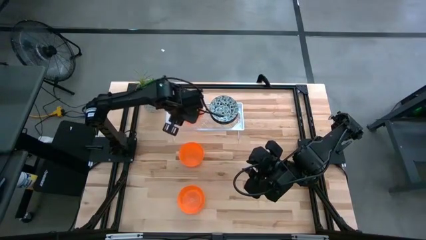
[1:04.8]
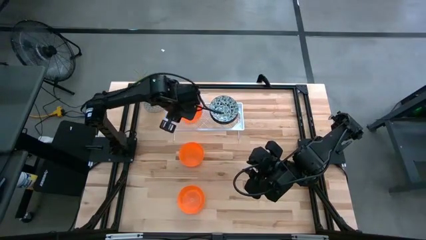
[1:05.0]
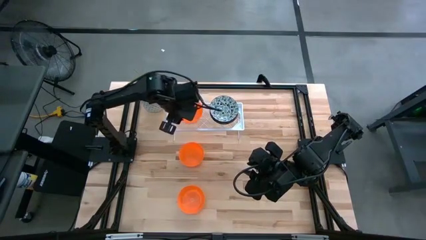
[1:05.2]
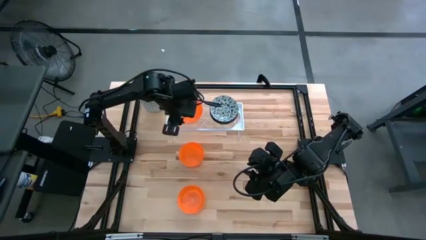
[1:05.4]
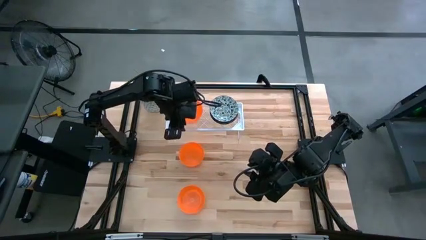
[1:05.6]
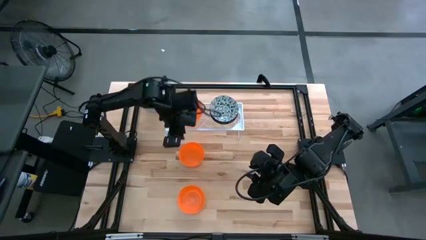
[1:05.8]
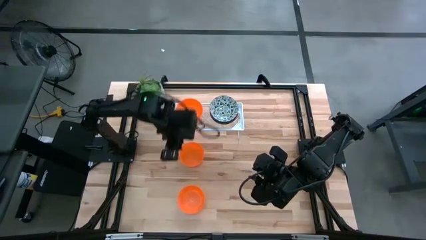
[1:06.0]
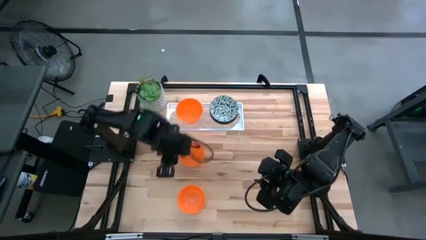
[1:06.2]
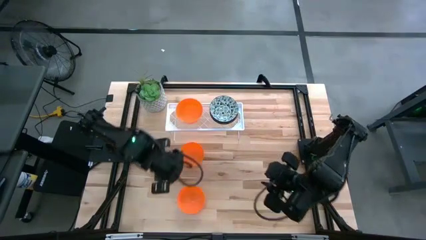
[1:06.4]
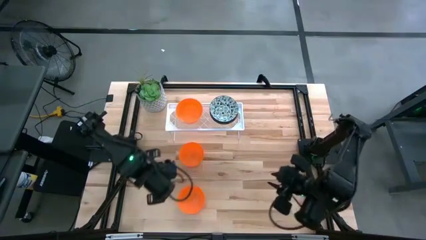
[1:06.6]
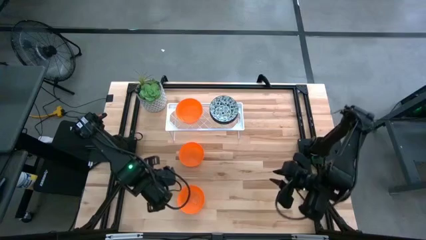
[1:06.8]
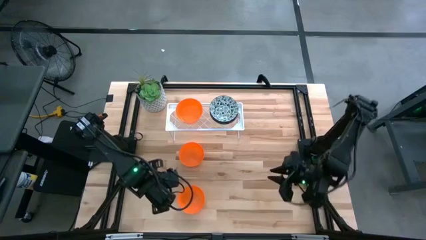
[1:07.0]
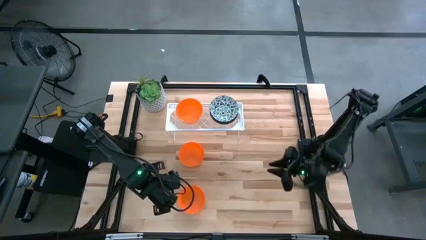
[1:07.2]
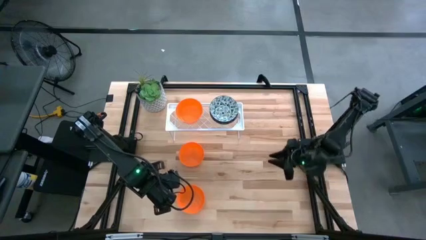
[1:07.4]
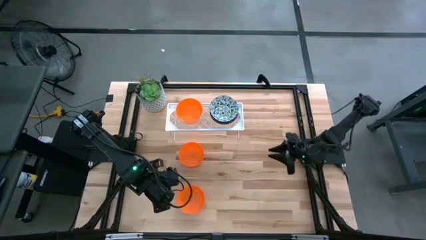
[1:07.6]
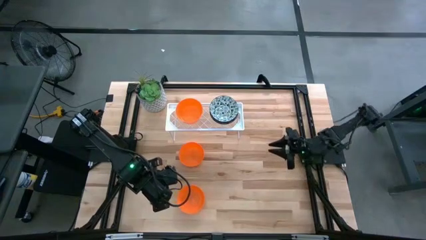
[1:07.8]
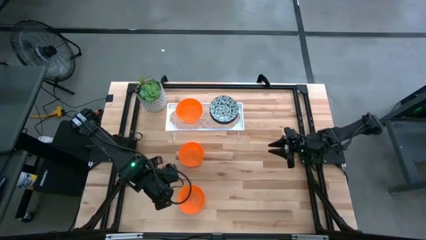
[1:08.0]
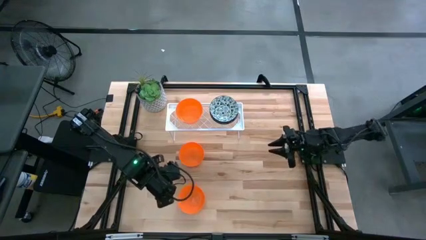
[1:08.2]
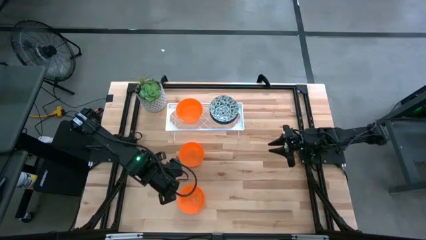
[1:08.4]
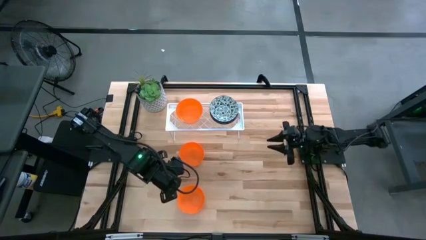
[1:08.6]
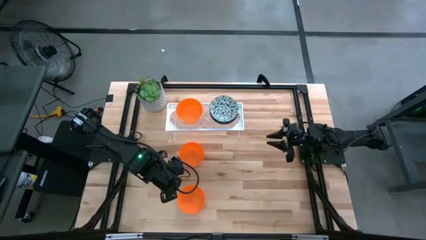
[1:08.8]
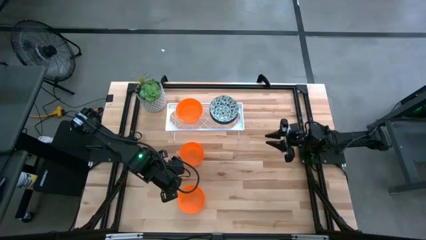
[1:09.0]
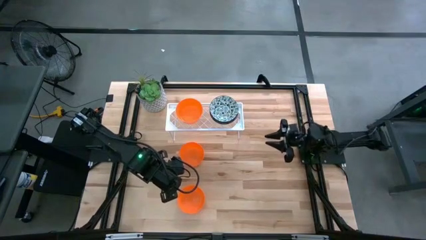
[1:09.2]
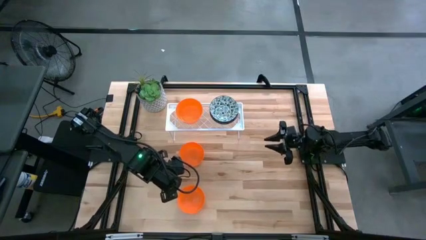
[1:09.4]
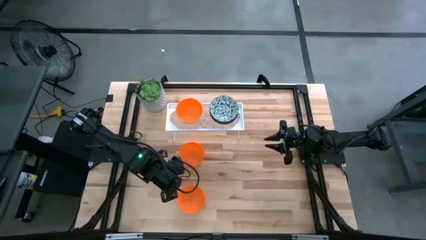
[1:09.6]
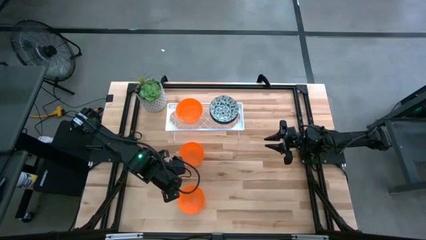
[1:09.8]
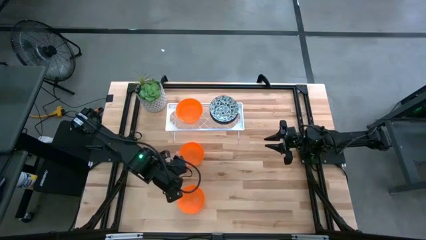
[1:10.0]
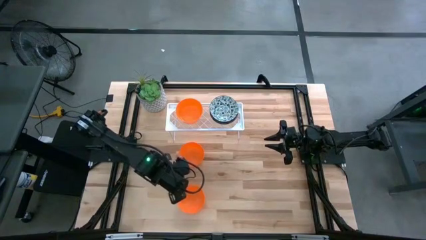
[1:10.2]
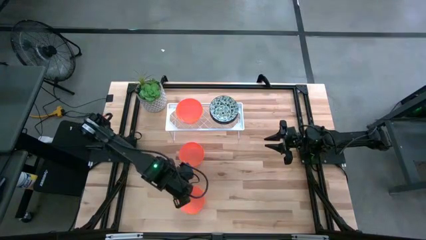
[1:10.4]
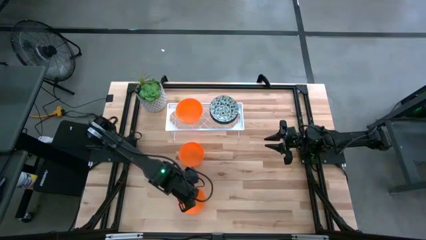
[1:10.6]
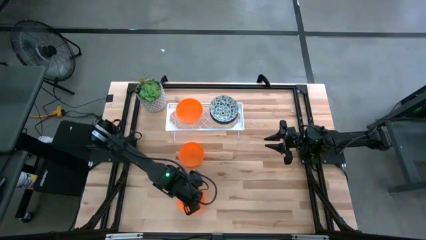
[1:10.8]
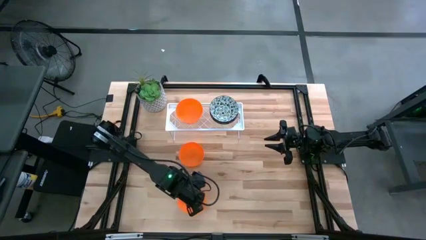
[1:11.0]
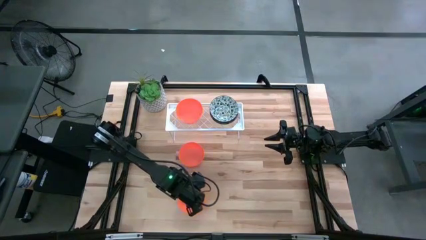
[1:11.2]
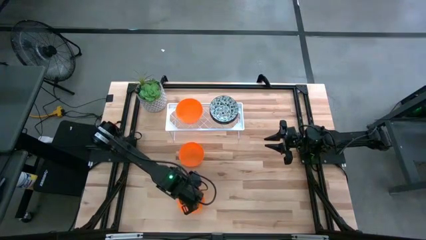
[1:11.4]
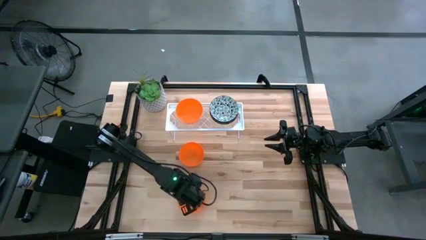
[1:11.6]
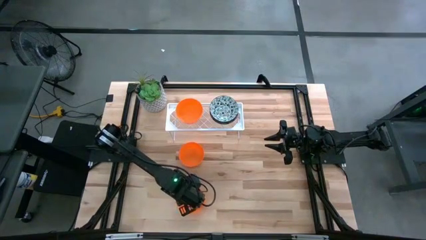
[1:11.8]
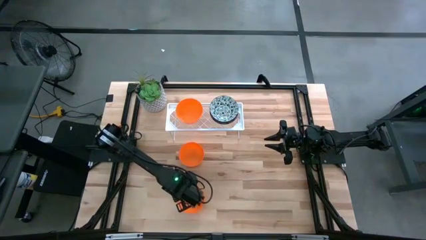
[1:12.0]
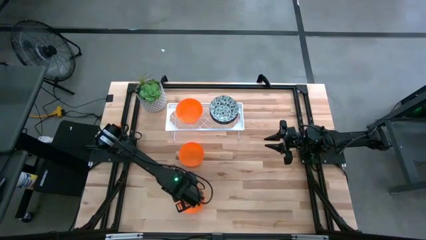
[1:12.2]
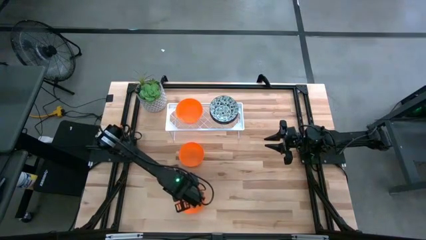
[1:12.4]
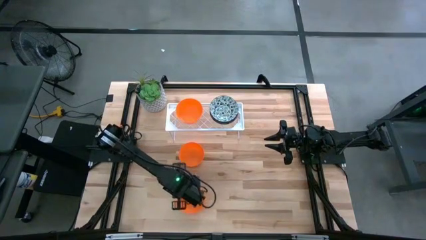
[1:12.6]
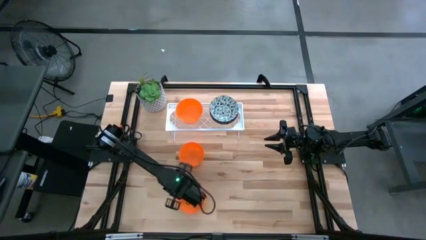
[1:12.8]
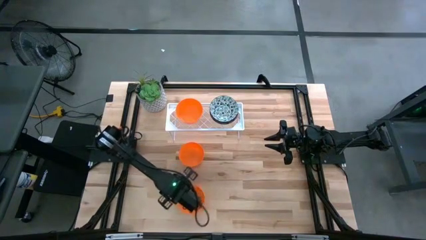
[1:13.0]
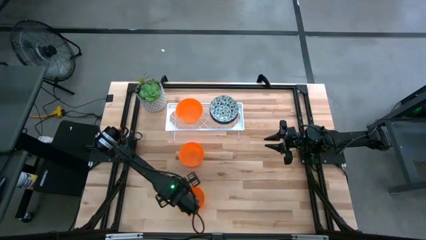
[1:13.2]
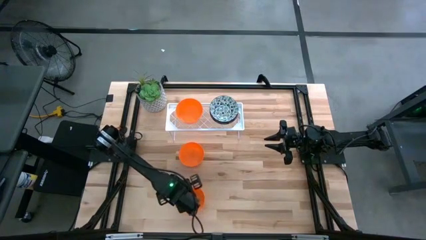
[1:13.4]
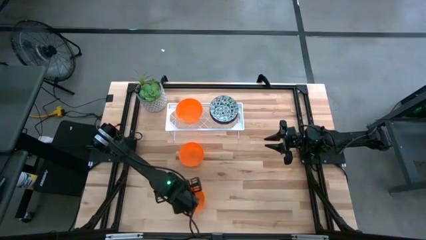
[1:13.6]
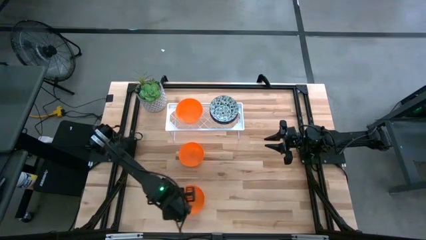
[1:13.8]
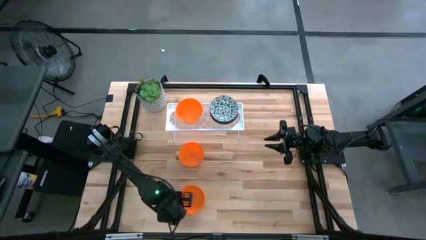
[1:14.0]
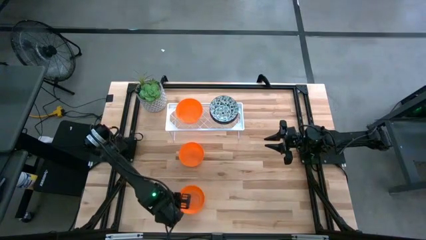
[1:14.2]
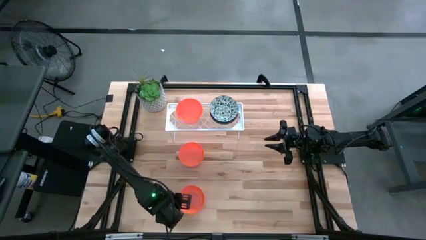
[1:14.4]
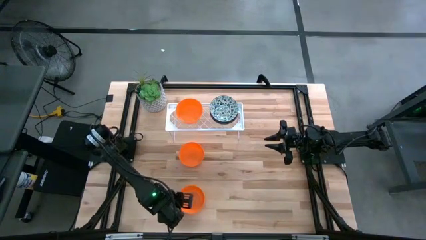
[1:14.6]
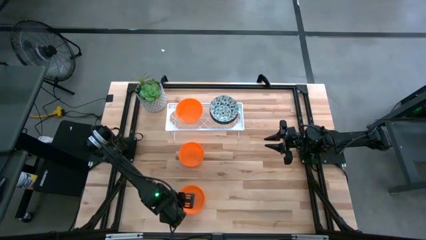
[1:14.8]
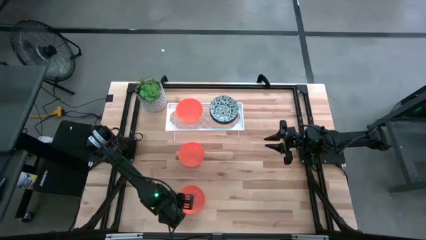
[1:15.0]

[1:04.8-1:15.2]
Task: Pick & Place Mini bowls
Stack the bottom orange bowl on the orange bowl on the shelf

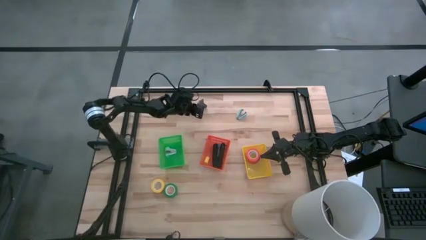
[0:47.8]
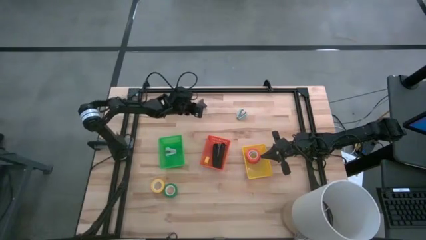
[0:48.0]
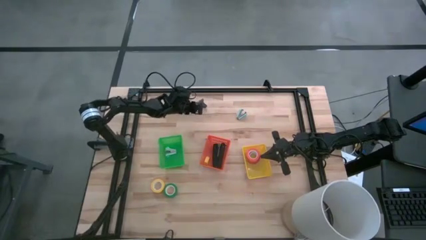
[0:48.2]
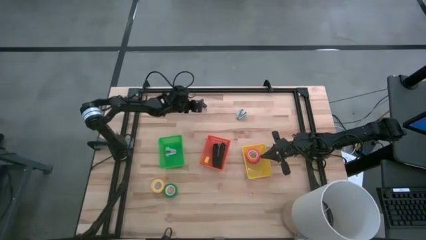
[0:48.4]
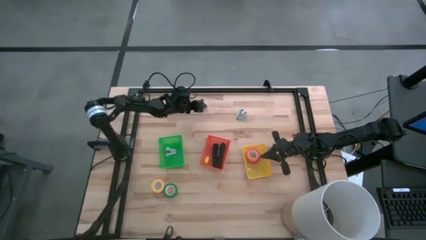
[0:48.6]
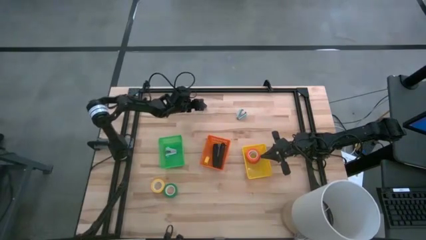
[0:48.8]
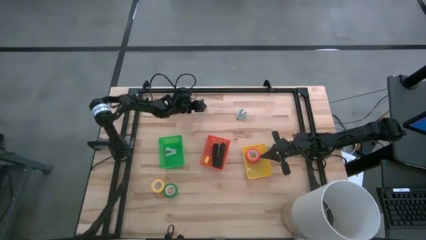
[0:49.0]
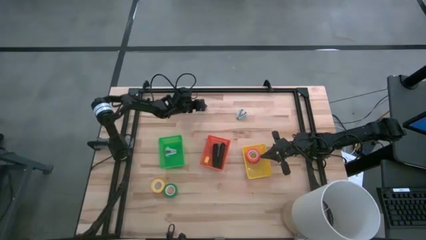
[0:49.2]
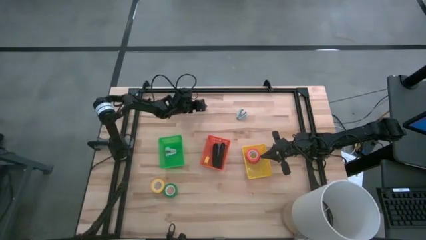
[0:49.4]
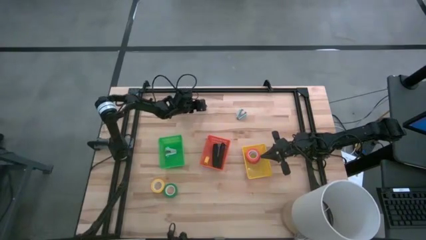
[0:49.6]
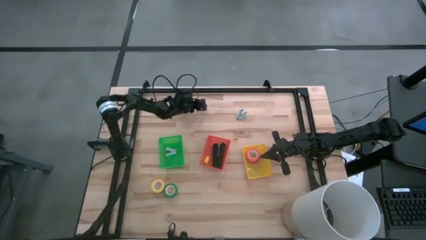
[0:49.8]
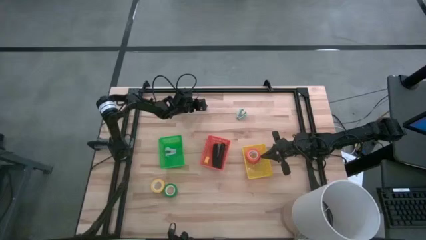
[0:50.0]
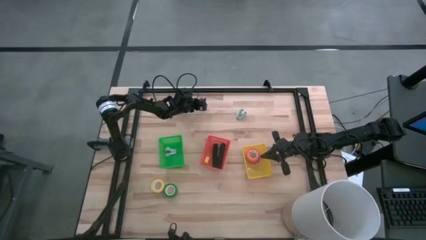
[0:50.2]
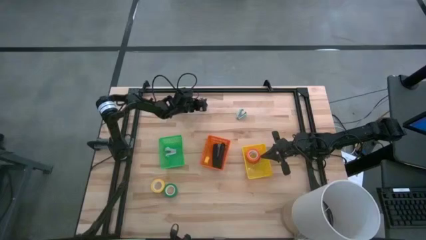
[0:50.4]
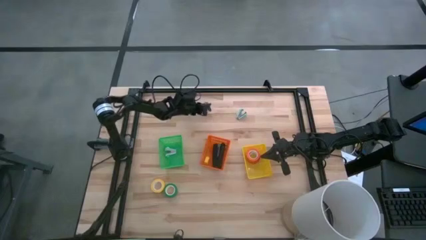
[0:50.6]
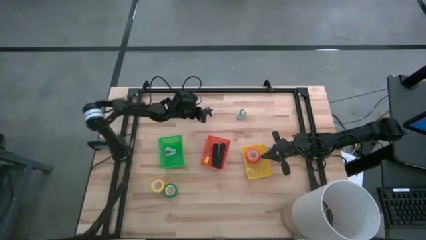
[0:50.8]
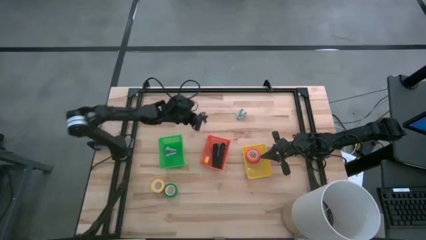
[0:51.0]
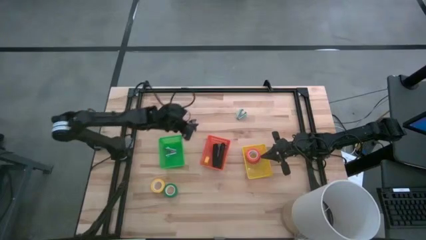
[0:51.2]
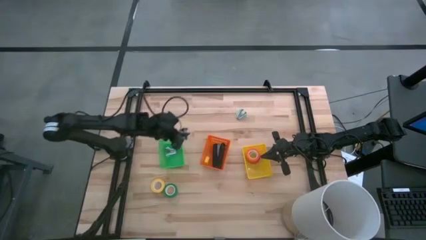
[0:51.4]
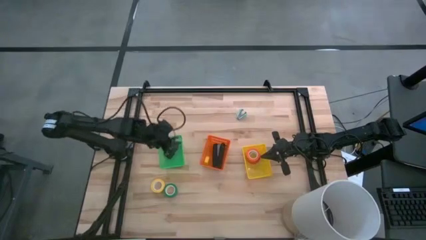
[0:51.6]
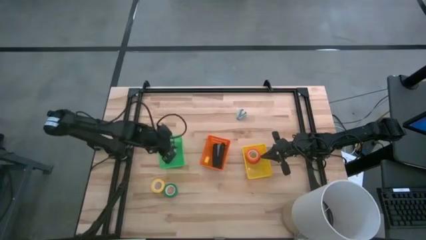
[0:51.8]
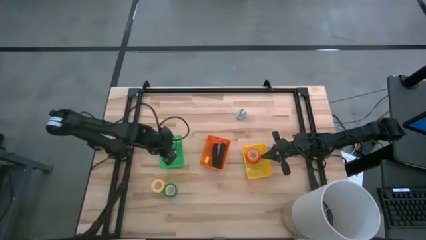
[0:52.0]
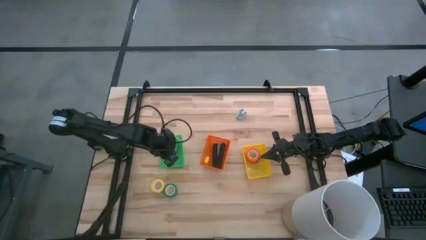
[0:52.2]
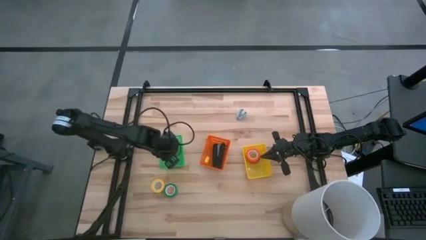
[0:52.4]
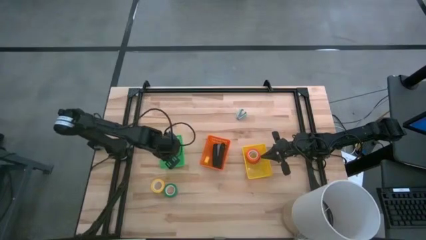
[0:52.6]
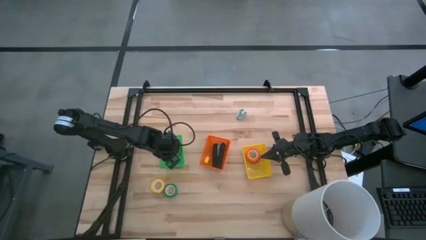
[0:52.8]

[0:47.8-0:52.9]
Task: Pick and place Stapler, Stapler remover, tape
Put the black staple remover into the green bin
